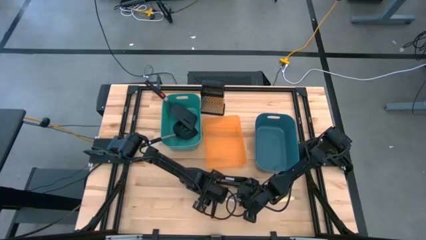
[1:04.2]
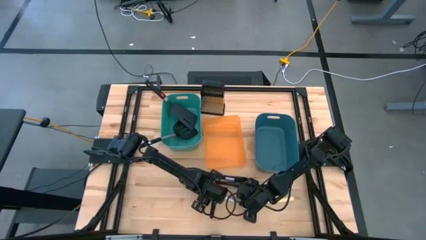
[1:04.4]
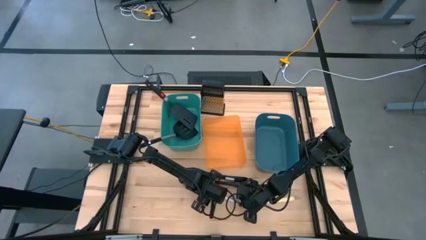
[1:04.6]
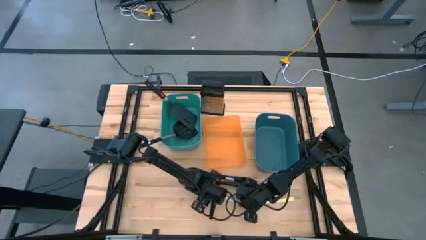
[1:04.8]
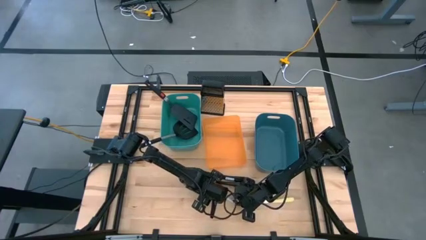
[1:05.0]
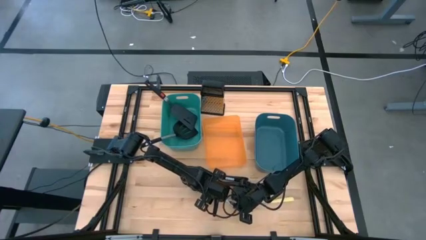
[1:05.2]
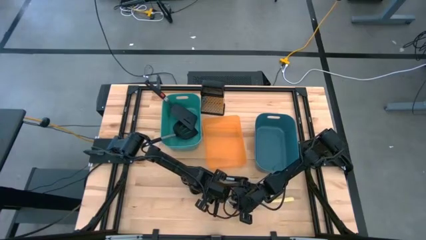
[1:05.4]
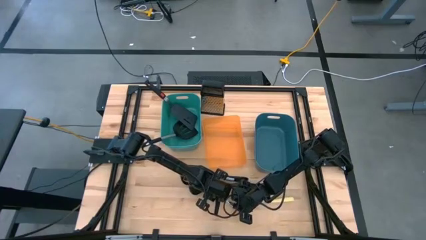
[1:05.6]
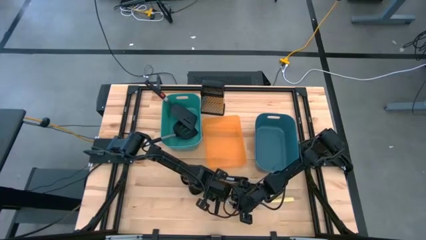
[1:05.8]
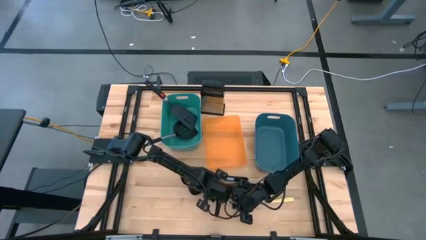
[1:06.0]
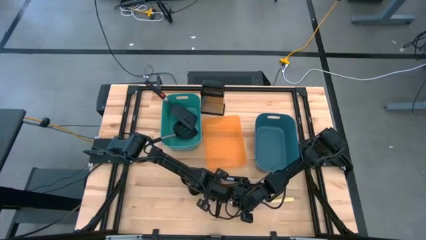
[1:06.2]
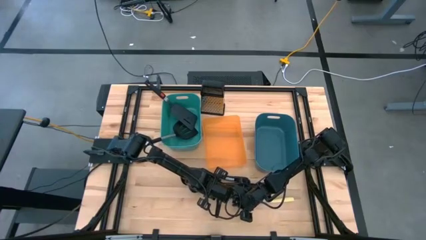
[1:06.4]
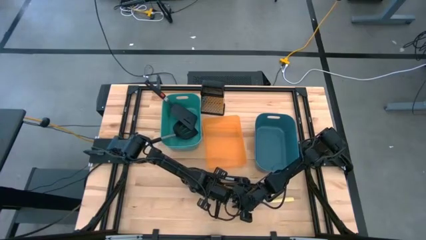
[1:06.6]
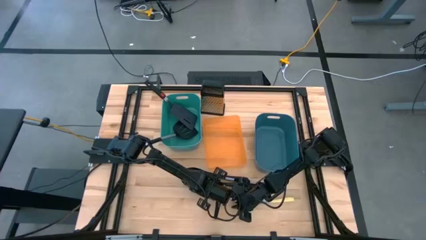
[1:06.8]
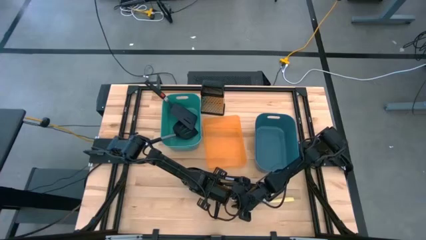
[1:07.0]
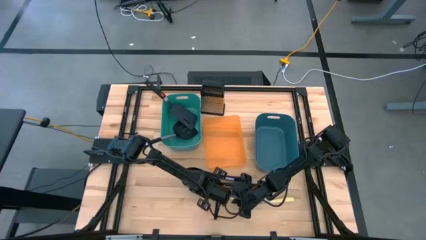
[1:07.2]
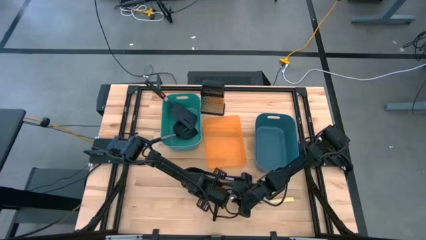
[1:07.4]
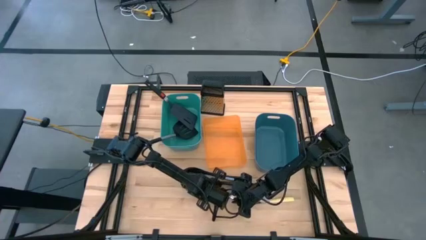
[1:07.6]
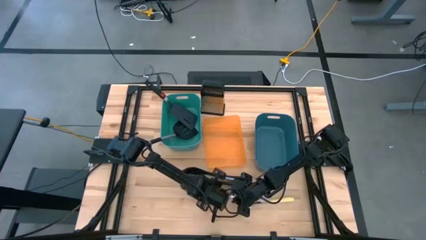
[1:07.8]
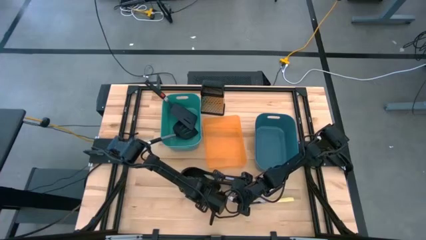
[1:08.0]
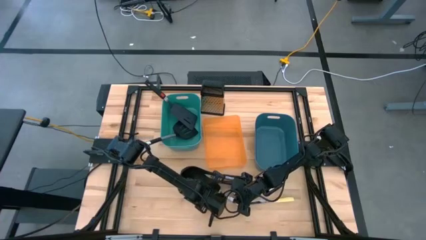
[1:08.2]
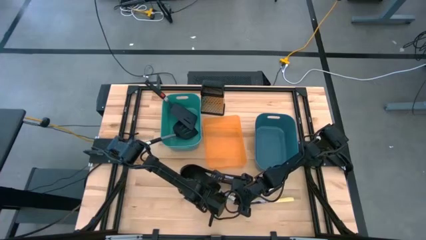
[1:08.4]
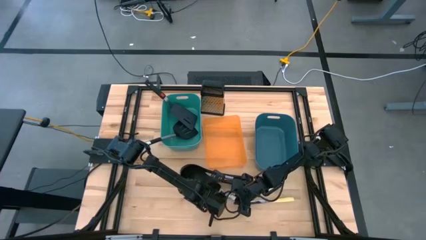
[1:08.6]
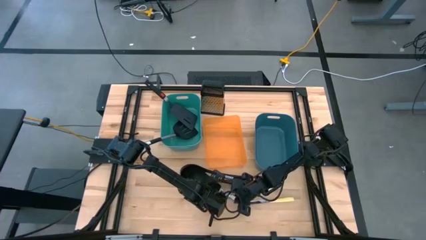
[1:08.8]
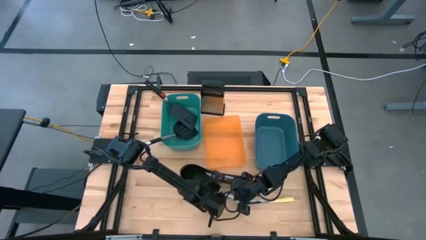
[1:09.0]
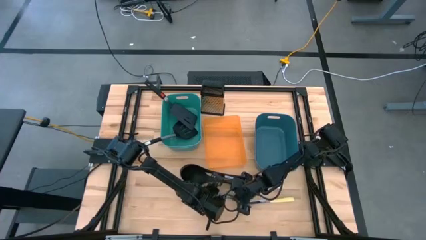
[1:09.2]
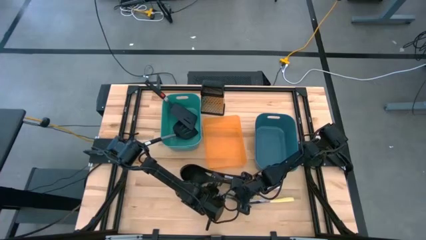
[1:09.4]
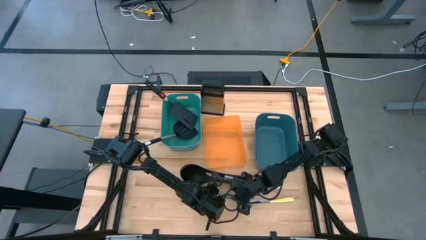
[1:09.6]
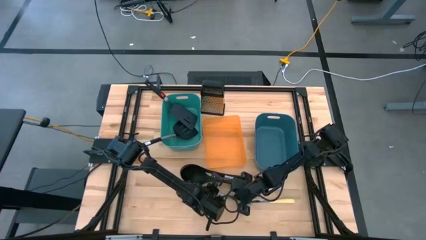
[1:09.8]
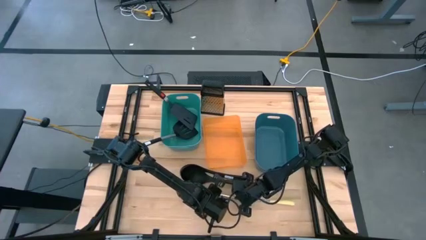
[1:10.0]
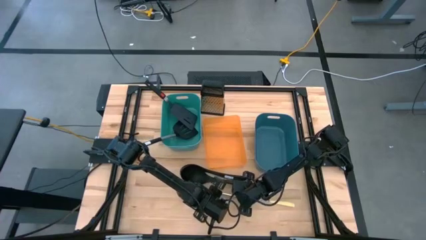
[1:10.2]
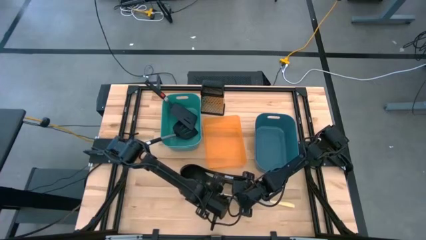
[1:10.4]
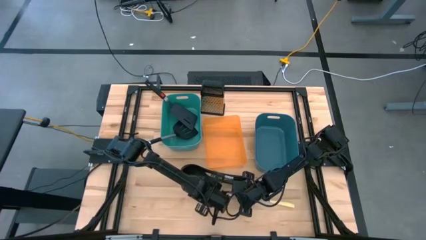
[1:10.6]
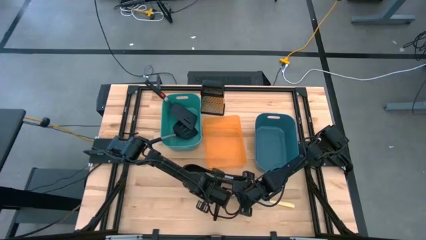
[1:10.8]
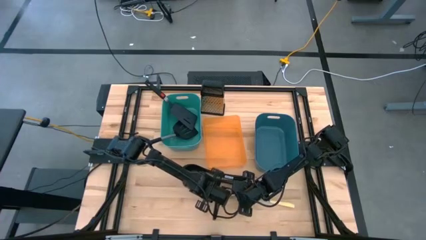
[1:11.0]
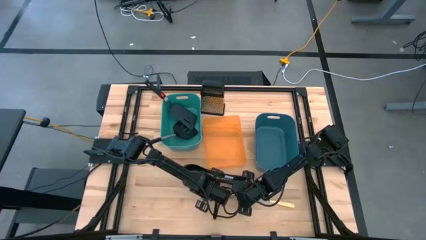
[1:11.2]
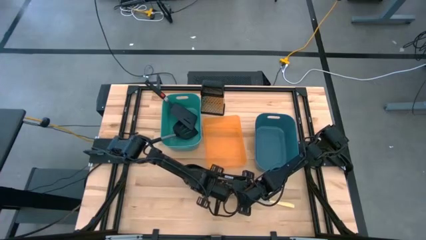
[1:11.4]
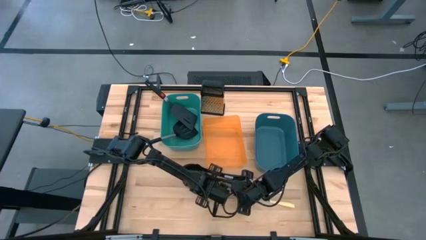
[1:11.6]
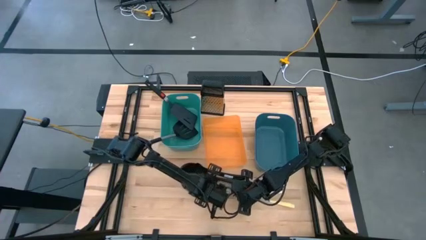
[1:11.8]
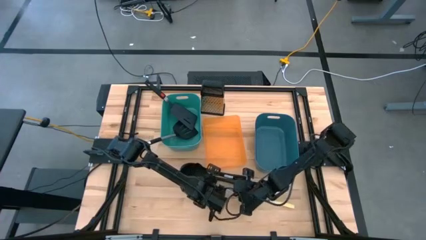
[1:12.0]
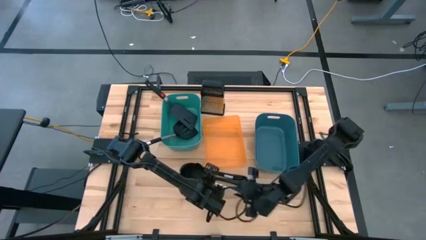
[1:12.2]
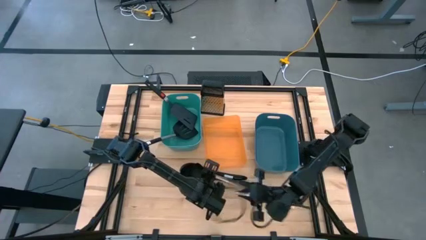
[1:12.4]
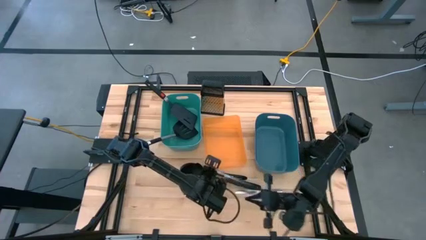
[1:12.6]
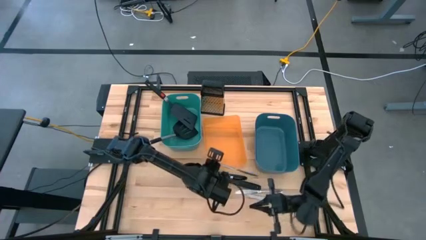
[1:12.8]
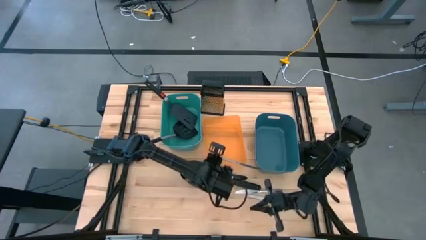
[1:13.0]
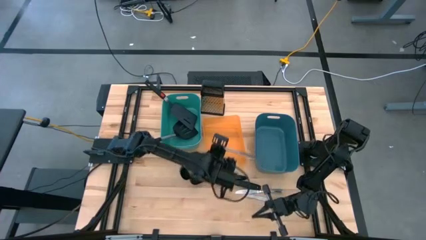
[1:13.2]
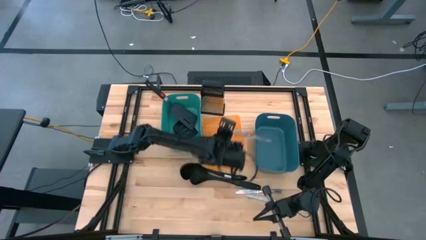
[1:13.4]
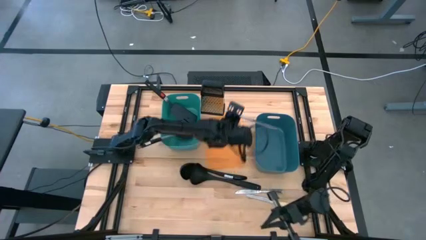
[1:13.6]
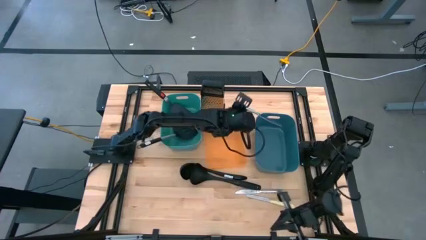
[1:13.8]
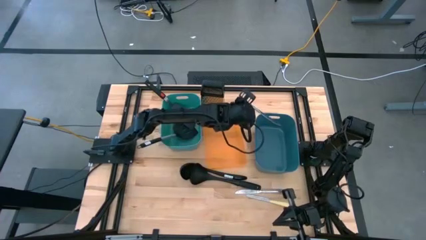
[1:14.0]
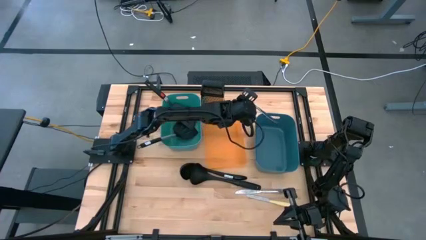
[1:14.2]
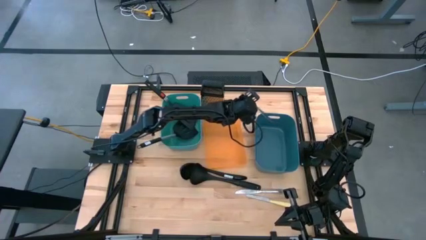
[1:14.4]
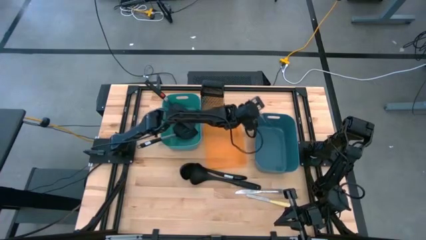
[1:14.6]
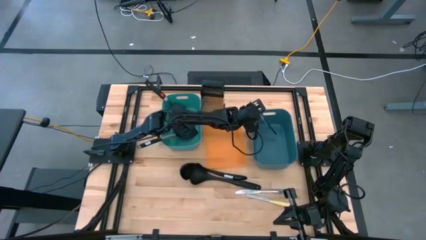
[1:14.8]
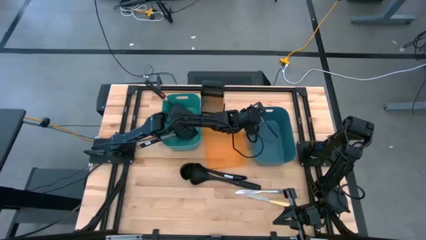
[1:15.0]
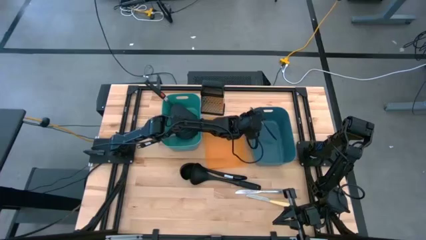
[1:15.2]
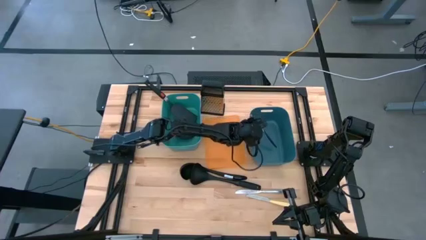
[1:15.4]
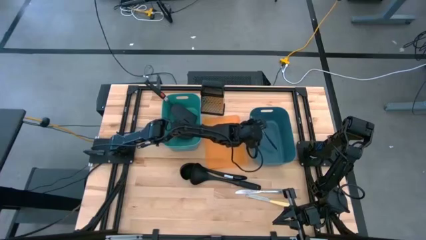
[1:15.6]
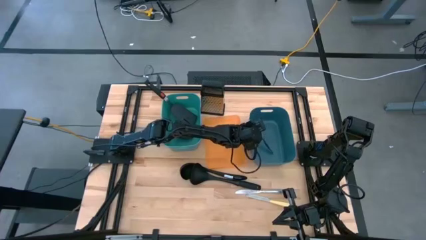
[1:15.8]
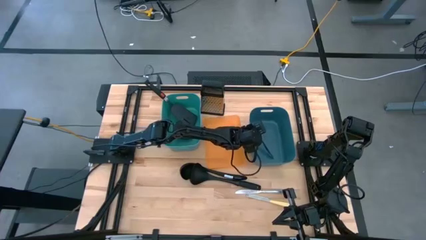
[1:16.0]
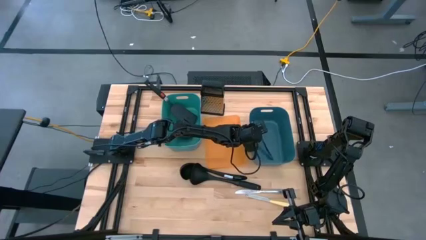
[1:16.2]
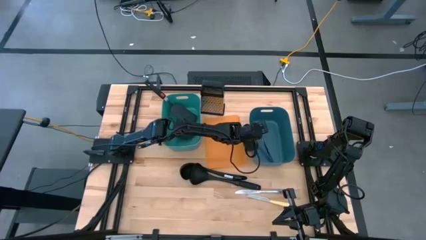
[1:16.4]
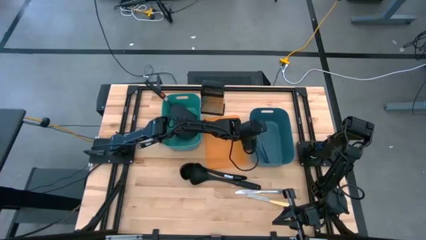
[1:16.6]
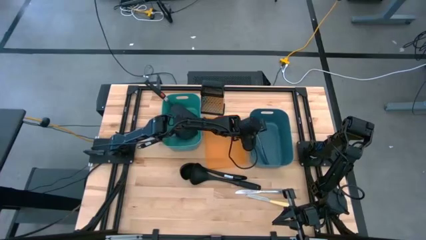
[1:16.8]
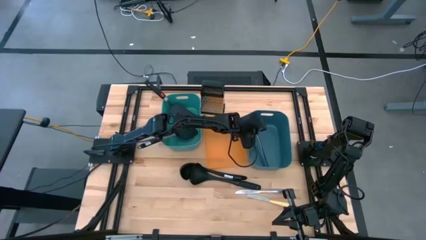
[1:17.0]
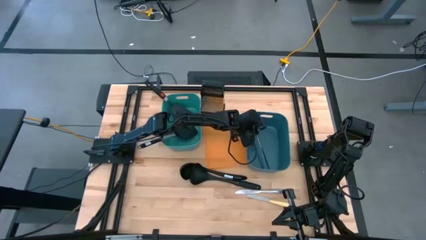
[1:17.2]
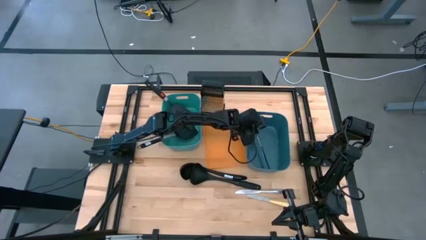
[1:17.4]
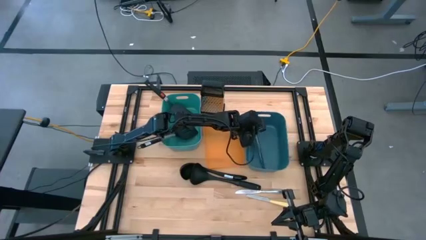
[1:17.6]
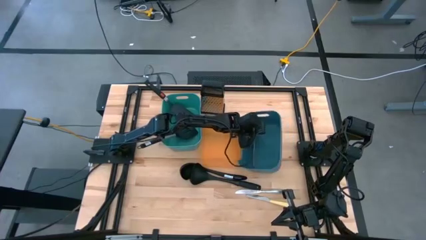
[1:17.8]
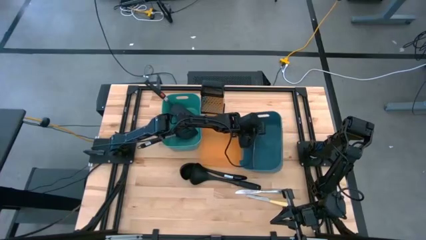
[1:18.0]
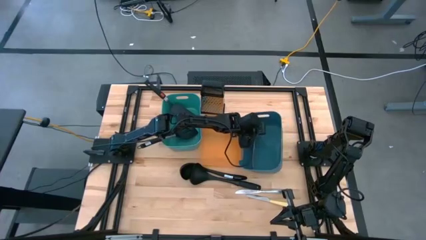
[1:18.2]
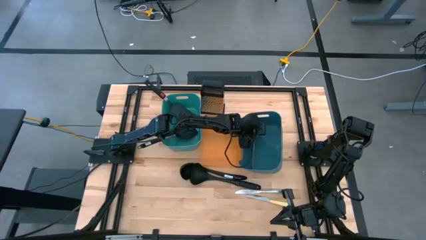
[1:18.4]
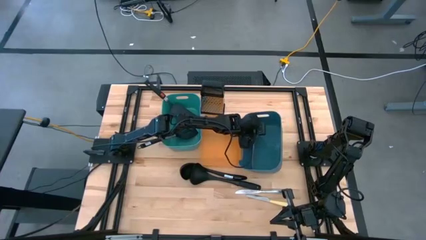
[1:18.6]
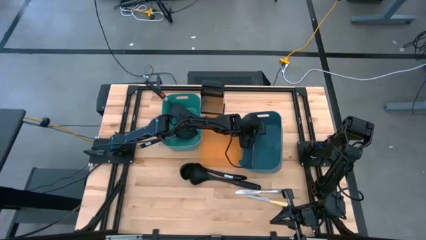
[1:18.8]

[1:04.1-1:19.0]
Task: Pick & Place Kitchen Items
Put the bottom silver table knife into the blue bin
